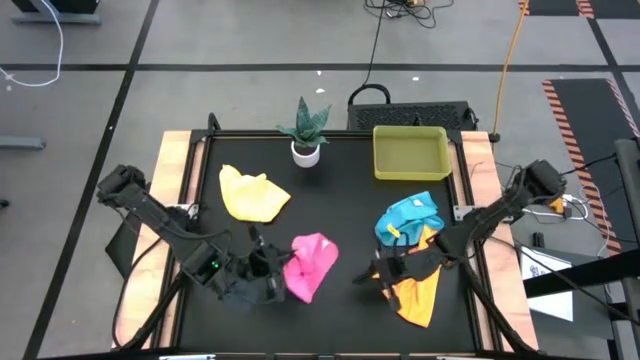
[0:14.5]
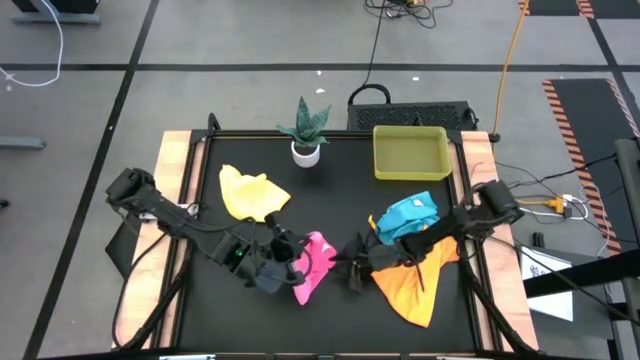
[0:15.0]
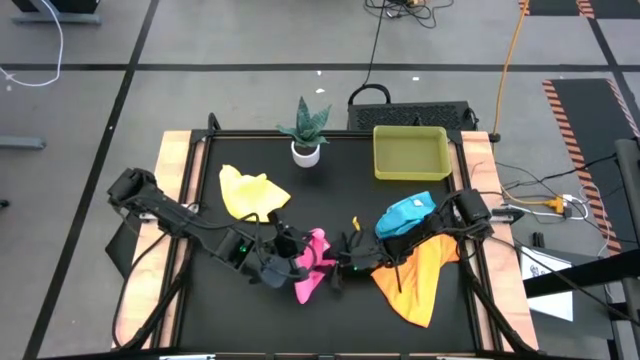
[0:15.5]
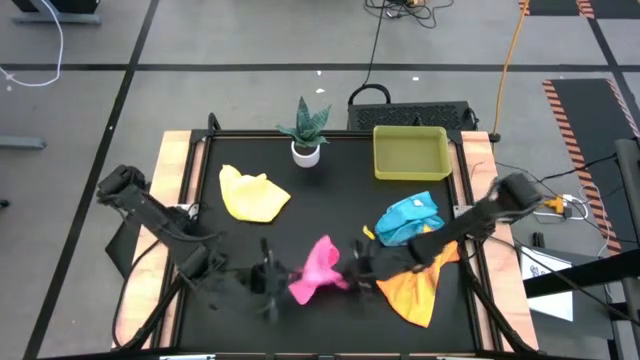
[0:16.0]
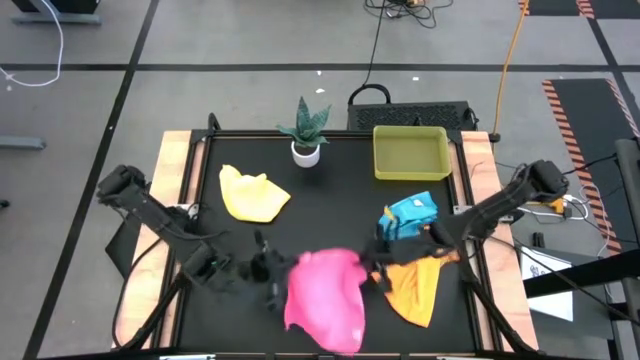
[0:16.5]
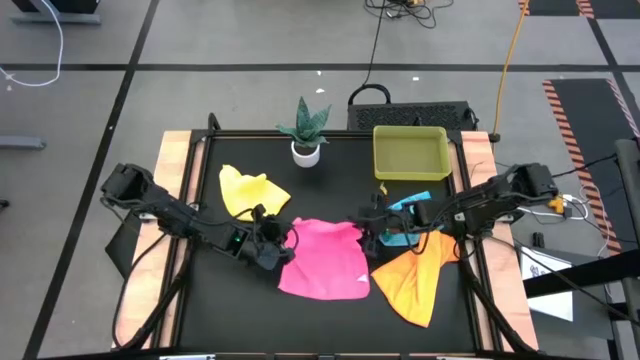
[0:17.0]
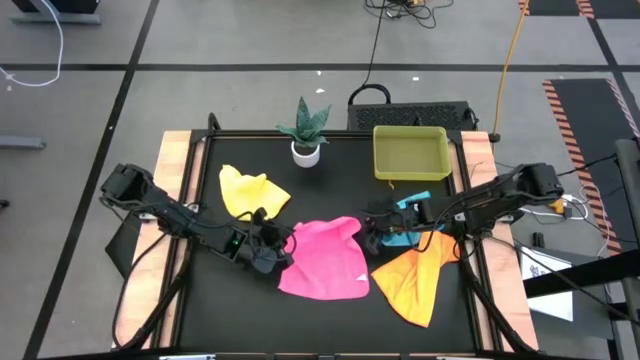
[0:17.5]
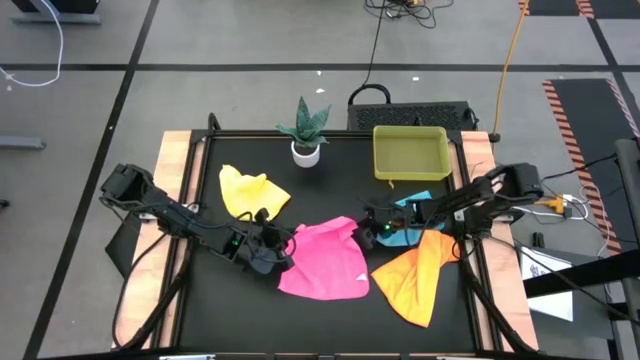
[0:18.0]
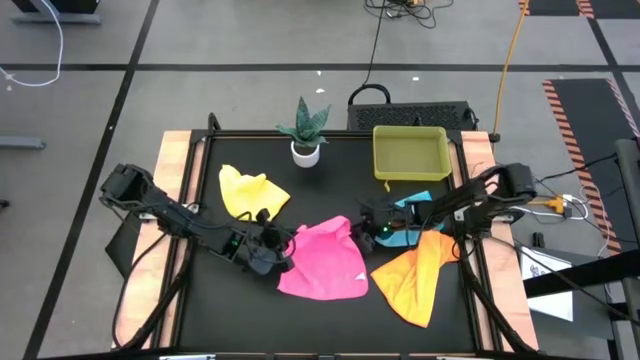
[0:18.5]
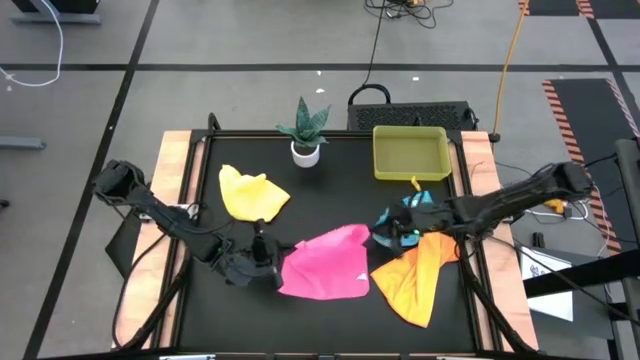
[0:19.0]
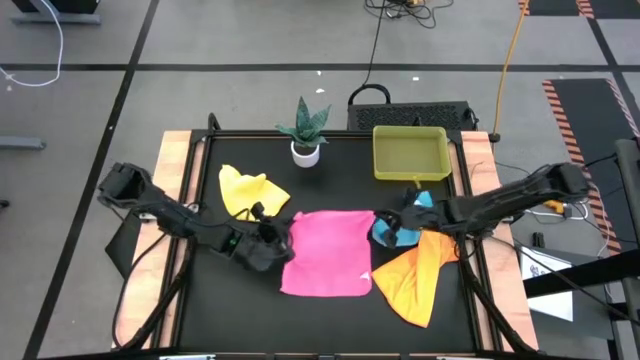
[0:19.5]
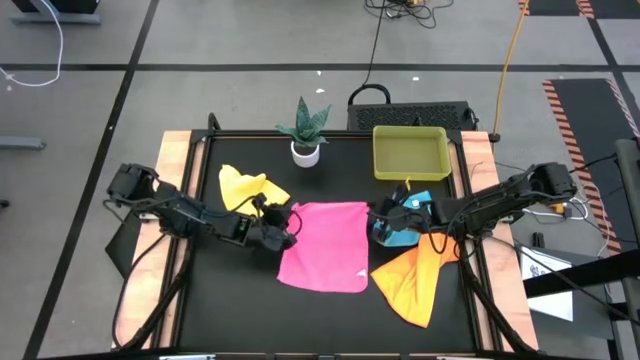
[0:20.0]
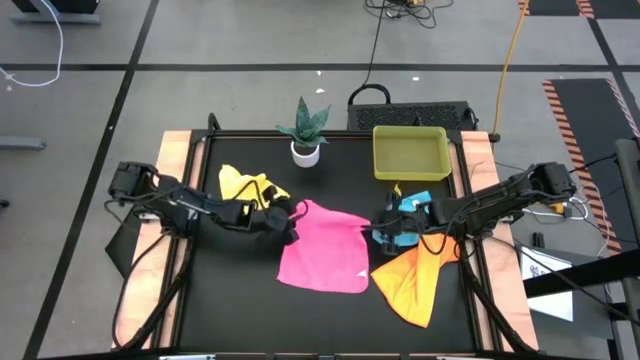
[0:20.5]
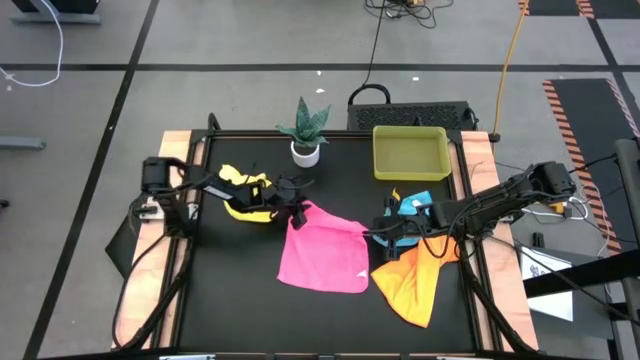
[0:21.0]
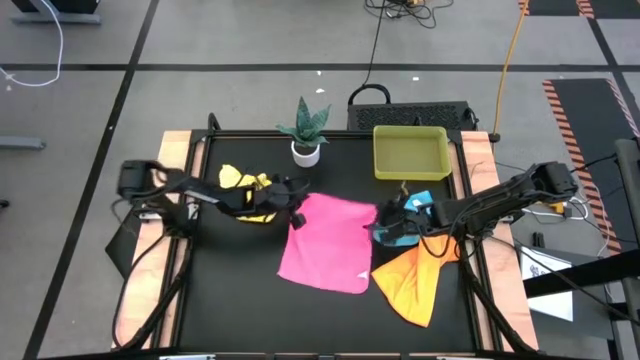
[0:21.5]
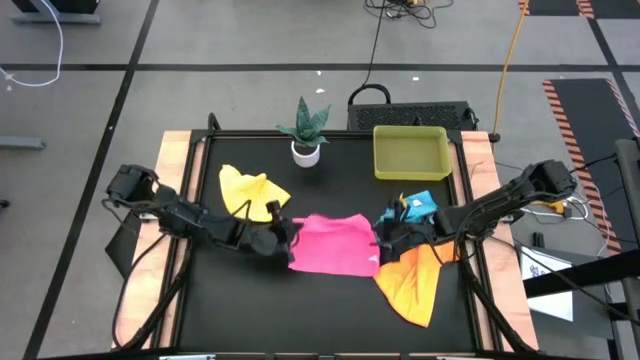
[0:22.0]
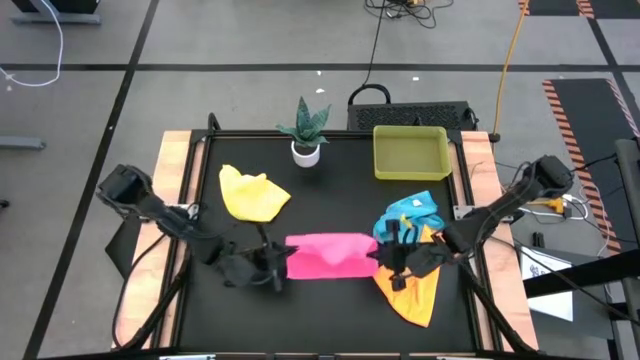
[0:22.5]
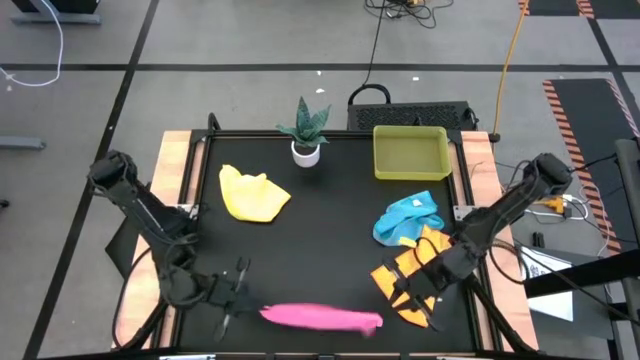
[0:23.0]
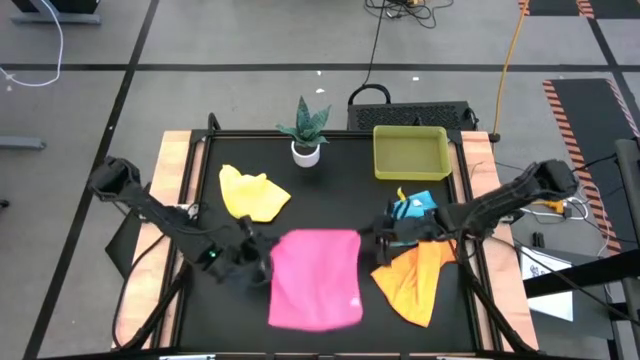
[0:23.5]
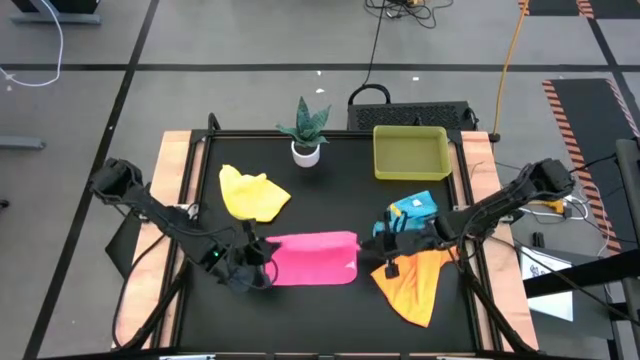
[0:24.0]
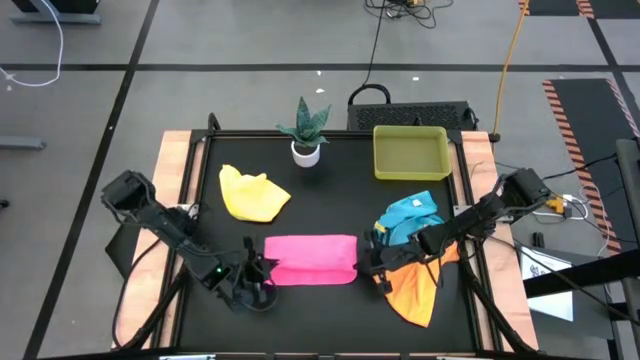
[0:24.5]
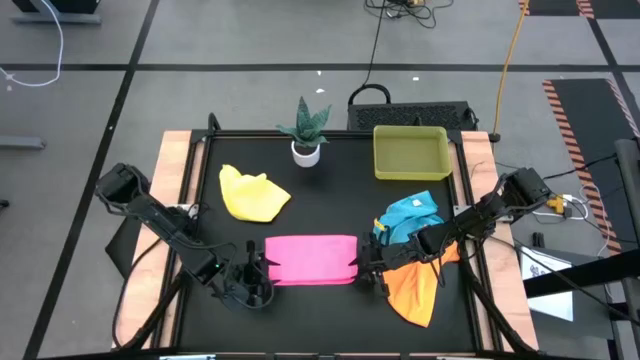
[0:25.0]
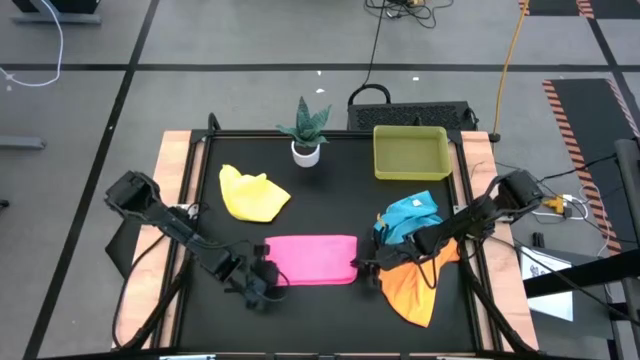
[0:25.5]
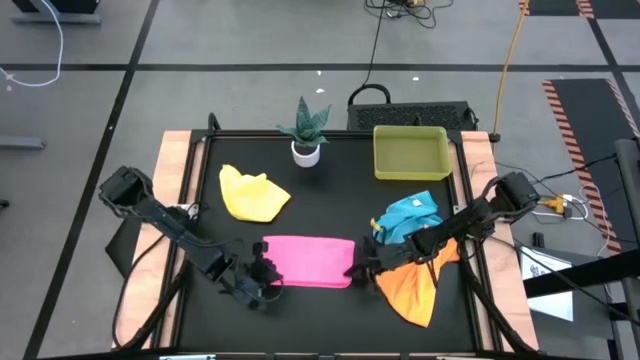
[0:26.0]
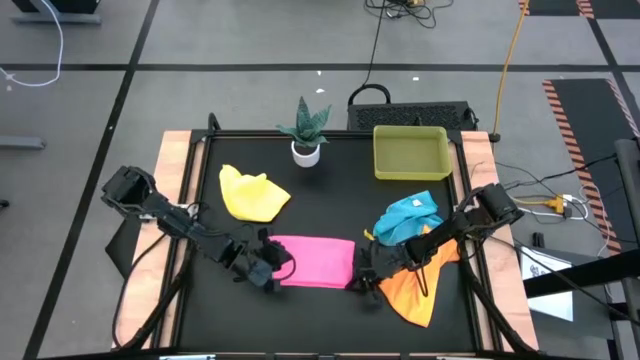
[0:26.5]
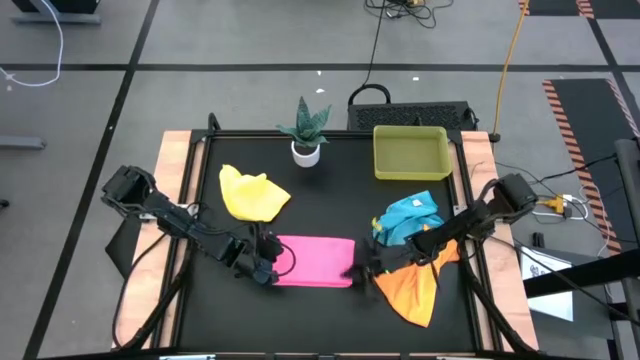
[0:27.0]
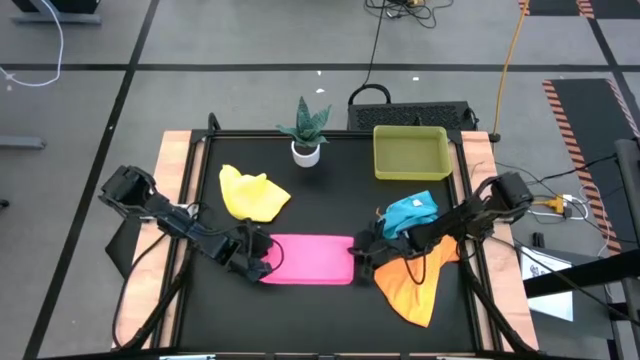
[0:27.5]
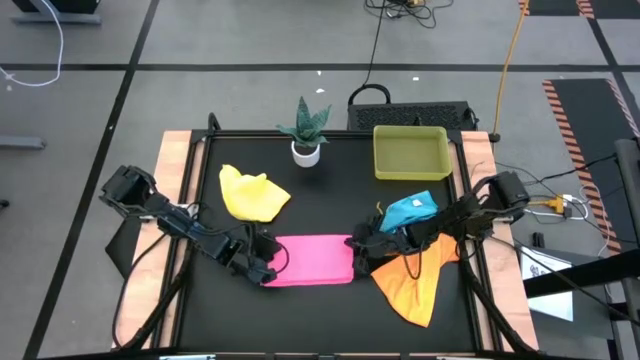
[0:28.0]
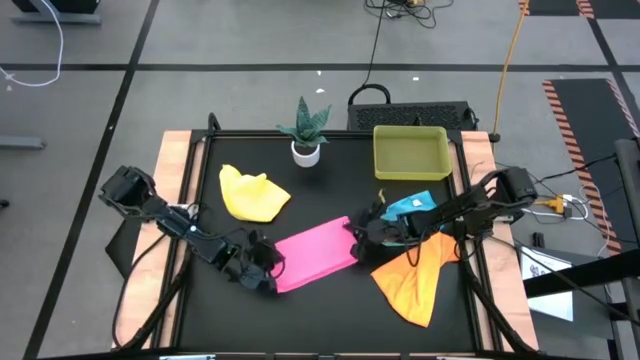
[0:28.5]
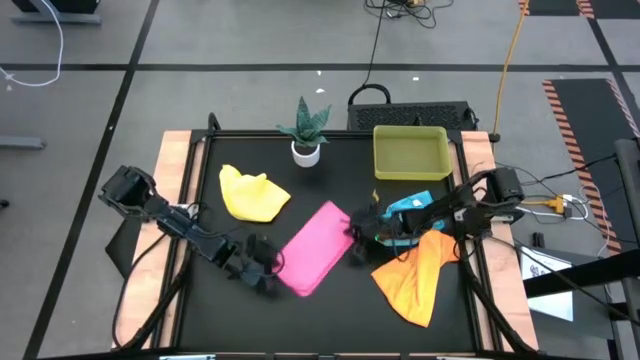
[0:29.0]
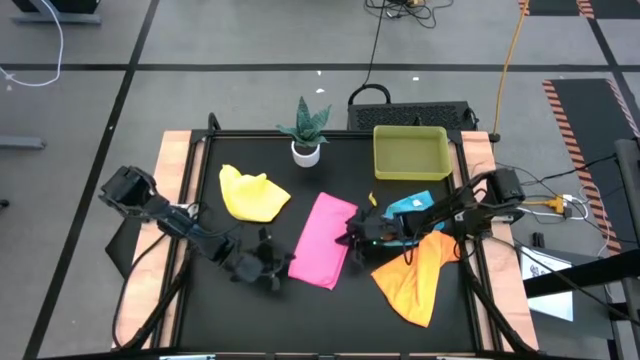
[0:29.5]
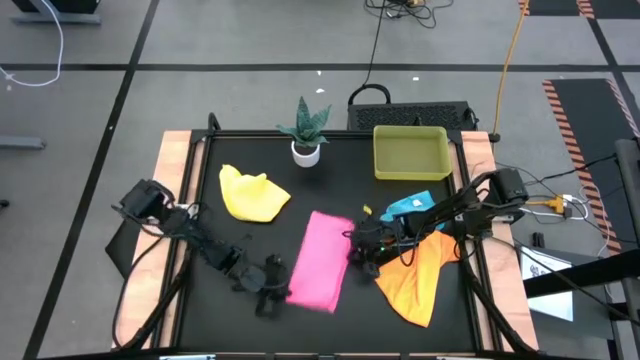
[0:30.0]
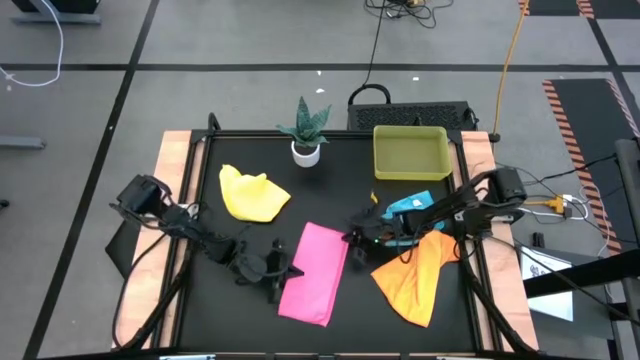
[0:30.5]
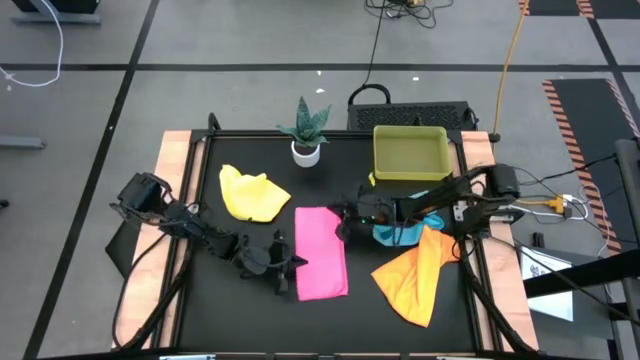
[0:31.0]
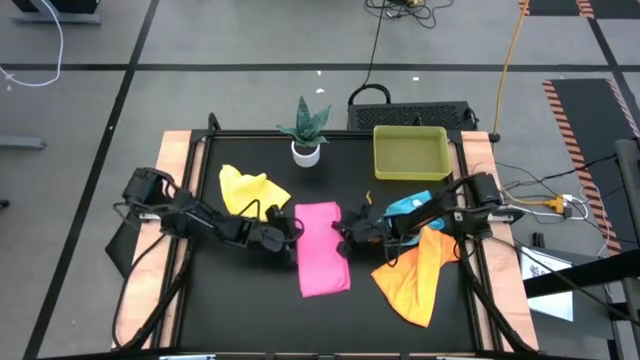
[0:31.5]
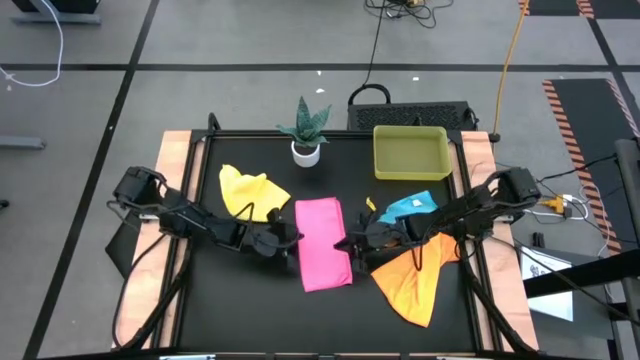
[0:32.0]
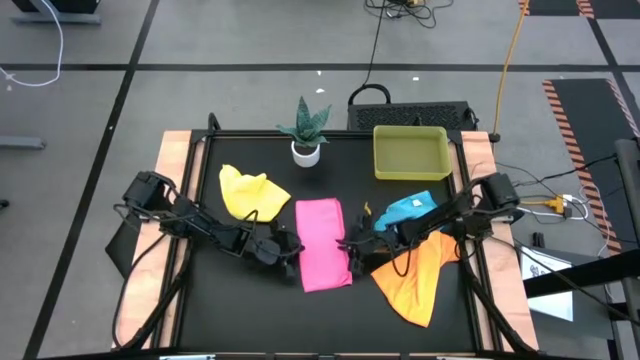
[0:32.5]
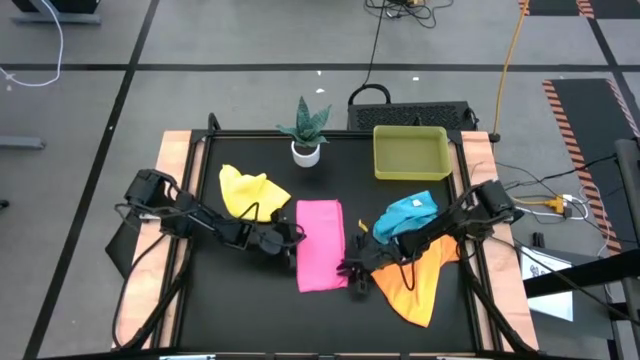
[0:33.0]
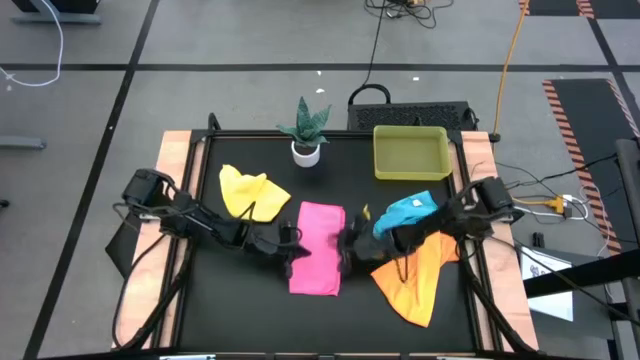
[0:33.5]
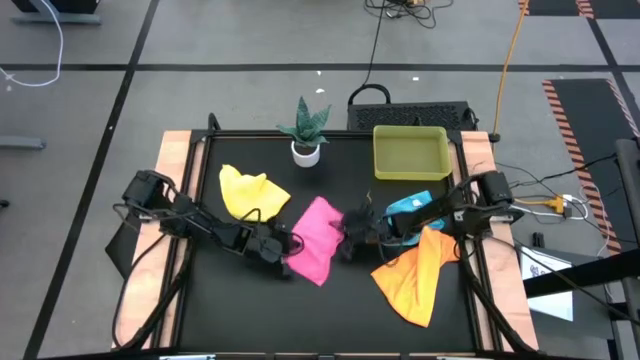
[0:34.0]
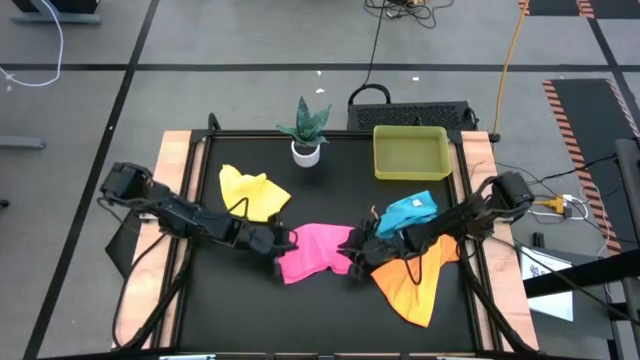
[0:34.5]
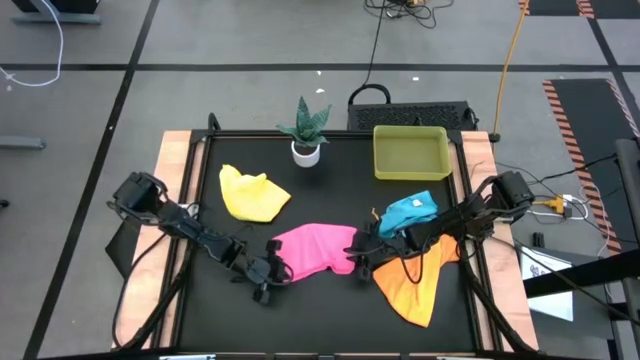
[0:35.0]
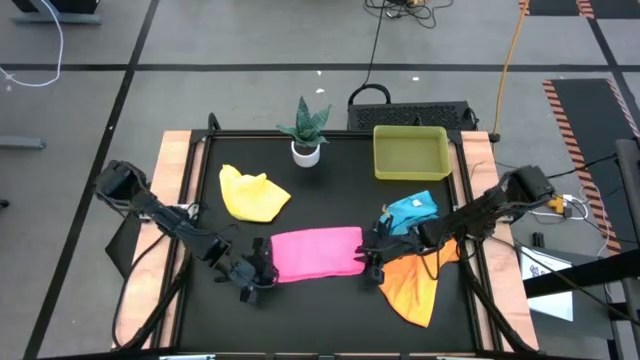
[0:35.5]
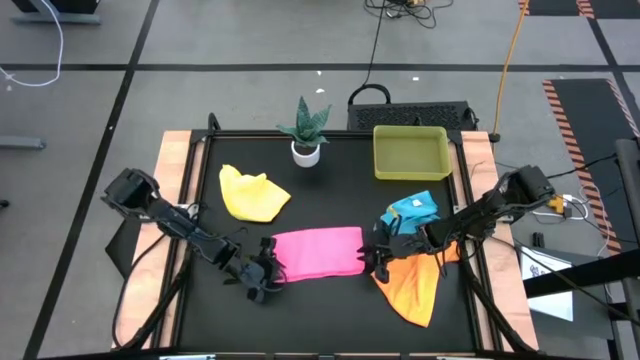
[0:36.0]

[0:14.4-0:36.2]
Task: Fold microfiber towels
Fold the pink microfiber cloth
